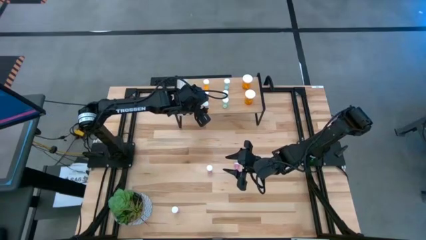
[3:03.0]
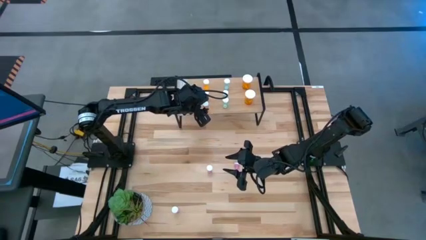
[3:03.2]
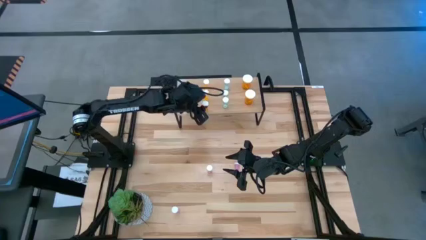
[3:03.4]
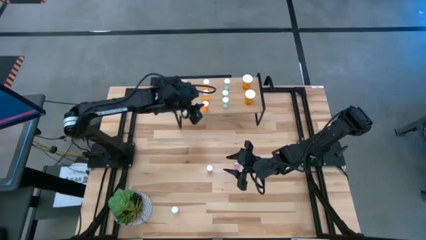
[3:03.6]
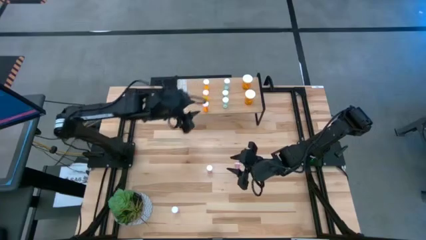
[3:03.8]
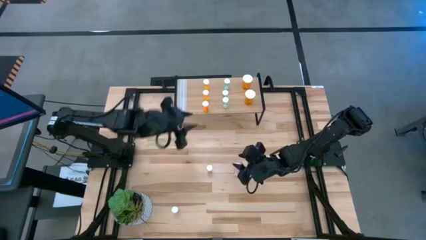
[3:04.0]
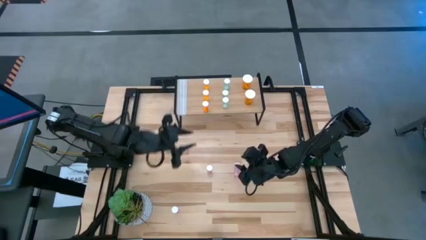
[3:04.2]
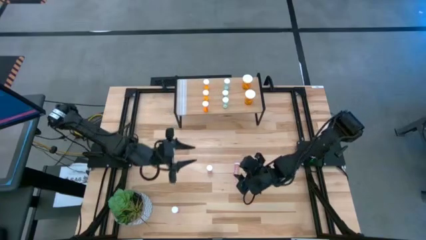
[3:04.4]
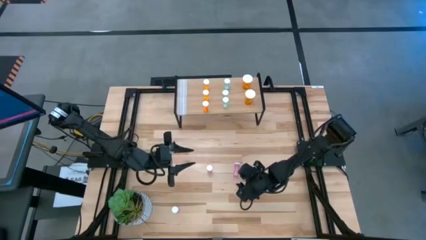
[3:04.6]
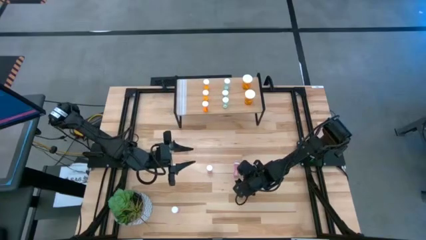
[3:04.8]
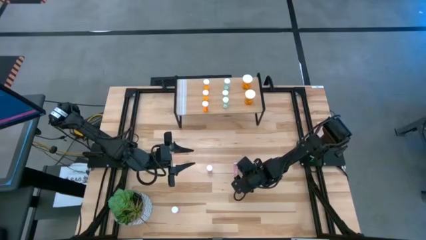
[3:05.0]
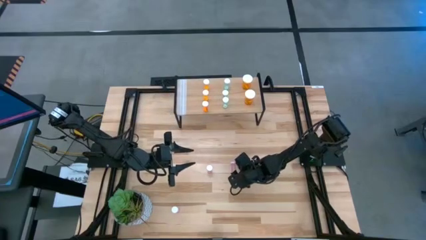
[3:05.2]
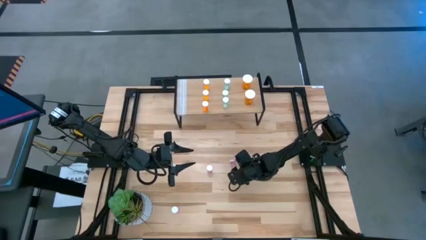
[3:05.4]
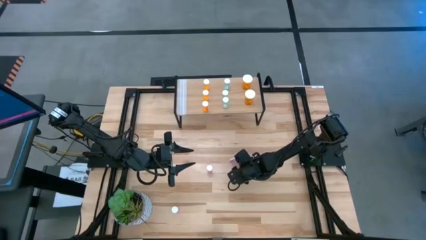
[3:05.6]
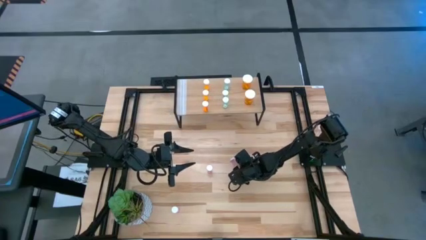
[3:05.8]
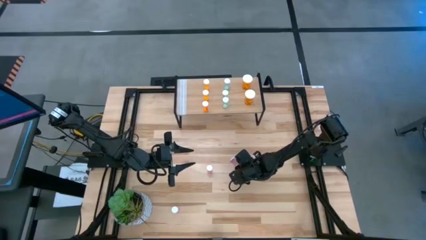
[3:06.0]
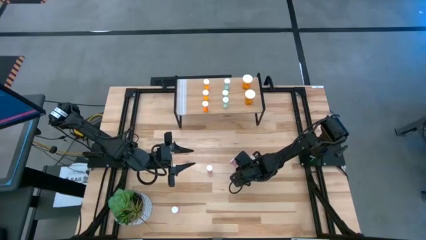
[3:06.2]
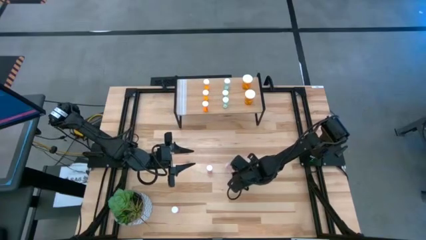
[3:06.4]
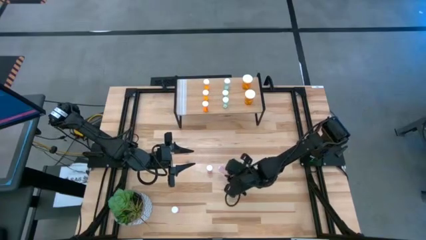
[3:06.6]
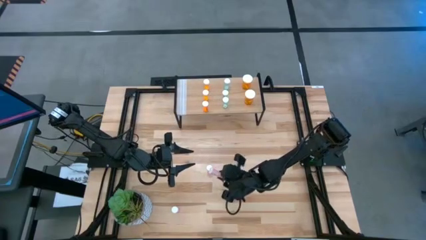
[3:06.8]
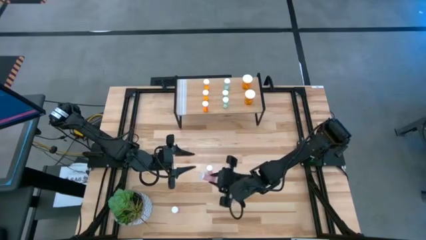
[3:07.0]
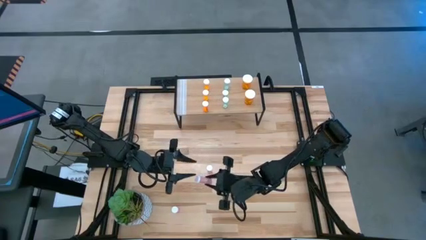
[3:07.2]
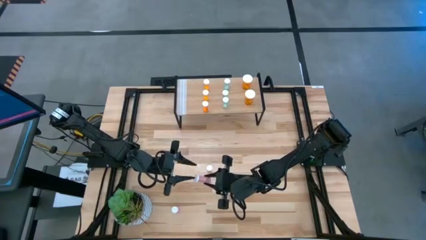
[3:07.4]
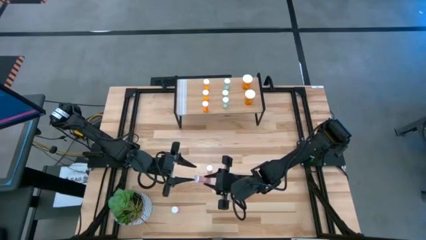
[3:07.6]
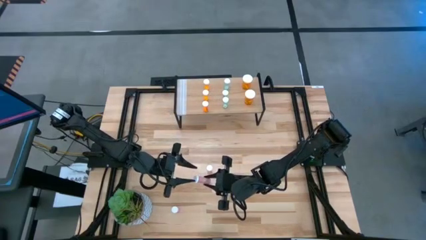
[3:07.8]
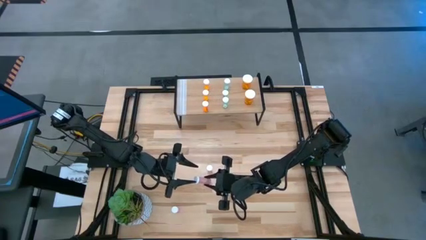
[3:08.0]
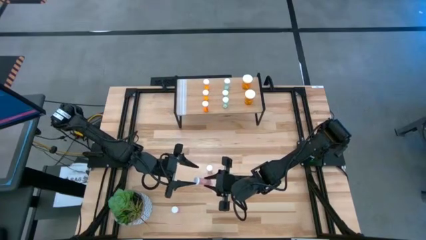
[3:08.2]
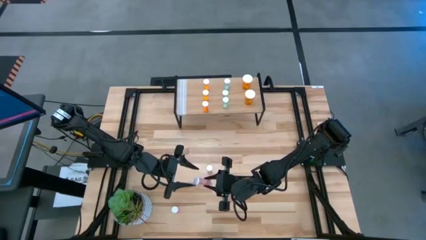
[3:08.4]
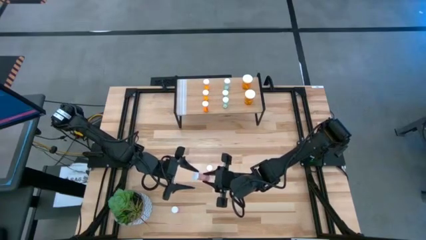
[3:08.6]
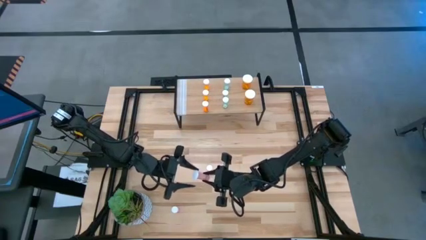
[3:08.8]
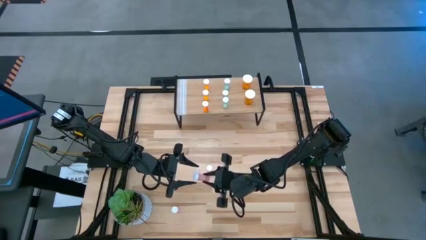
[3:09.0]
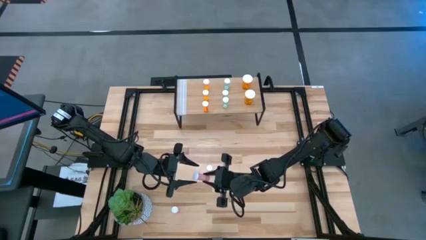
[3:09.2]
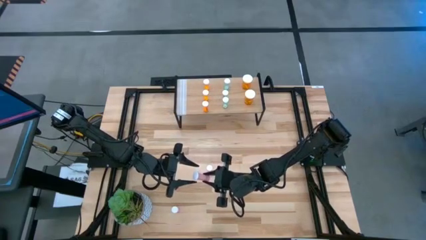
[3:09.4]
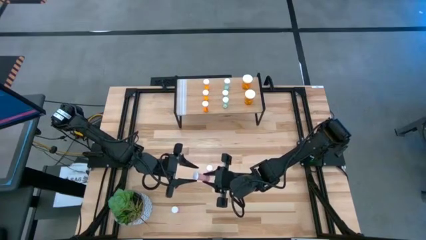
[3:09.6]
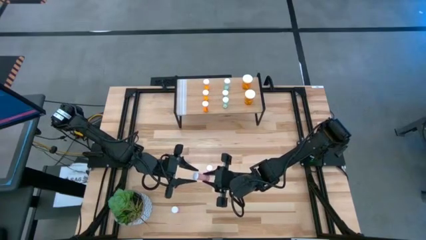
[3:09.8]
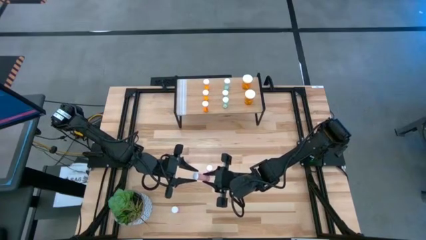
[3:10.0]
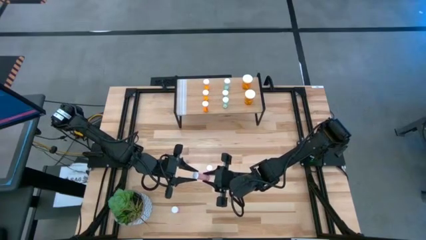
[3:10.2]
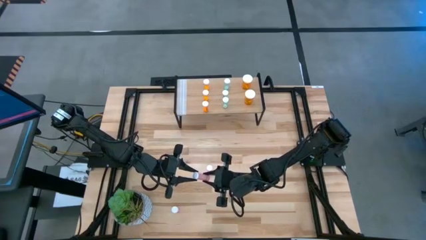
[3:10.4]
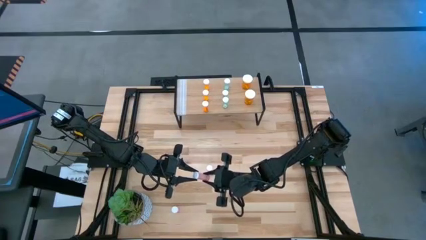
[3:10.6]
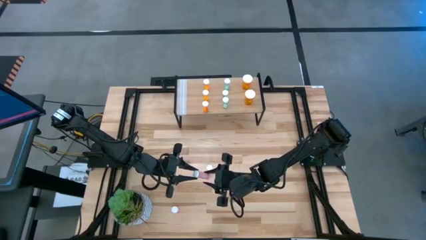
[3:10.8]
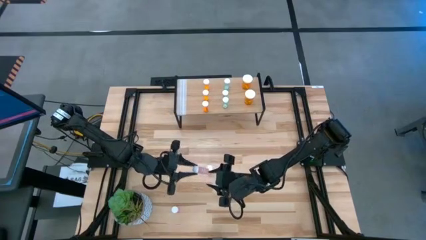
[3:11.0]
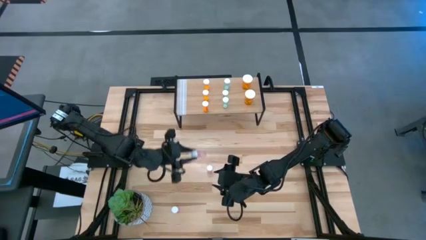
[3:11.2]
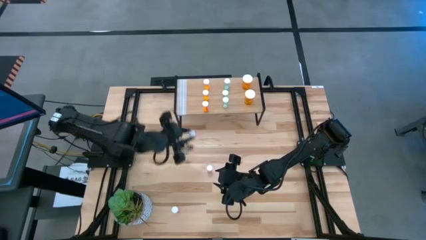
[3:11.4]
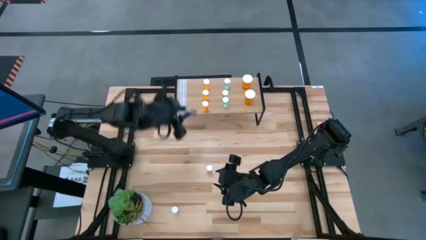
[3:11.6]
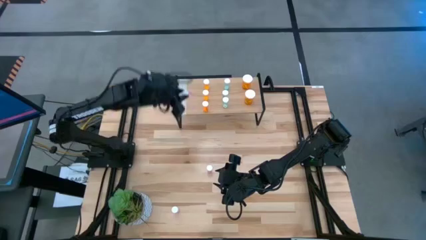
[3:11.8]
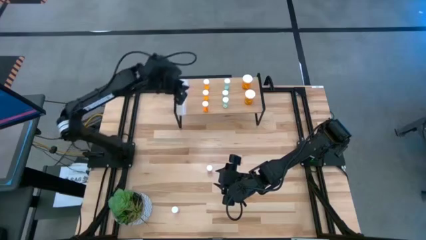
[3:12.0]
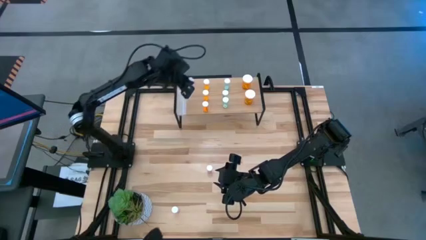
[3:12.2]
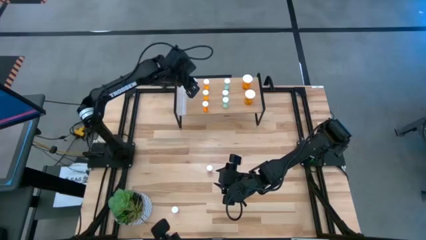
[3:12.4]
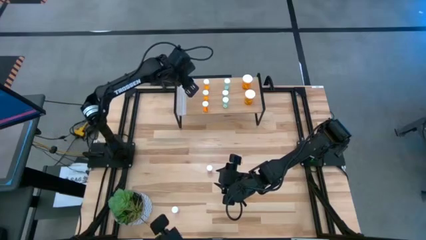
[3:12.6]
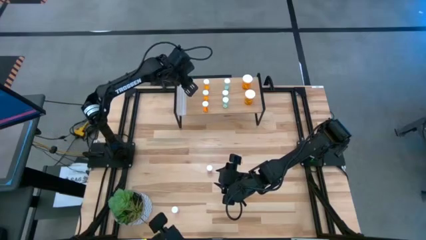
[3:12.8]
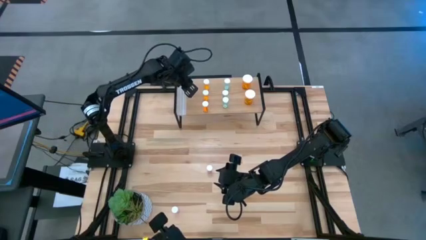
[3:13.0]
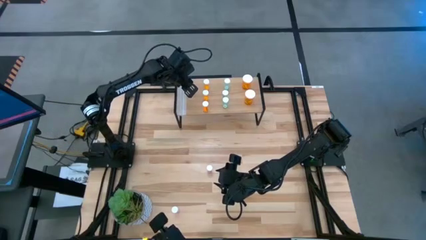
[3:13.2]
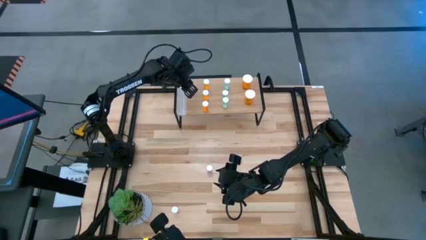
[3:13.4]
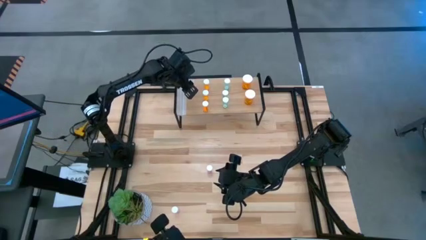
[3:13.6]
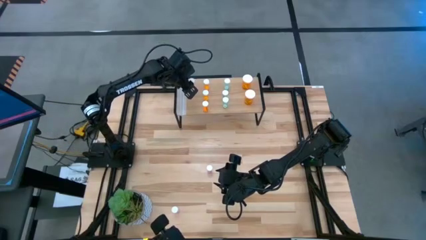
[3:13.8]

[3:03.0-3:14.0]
Task: Pick and place medicine bottles onto shelf by color
Put the top right small pink pill bottle on the shelf

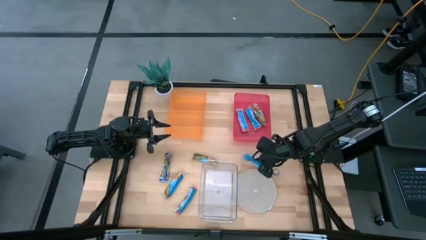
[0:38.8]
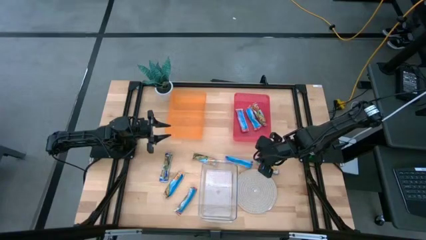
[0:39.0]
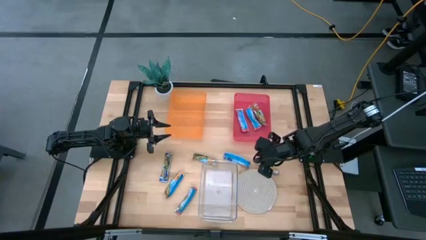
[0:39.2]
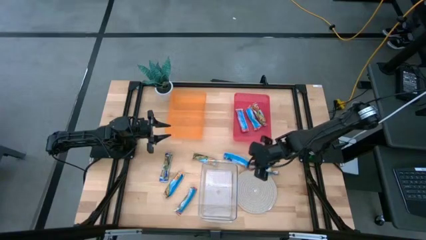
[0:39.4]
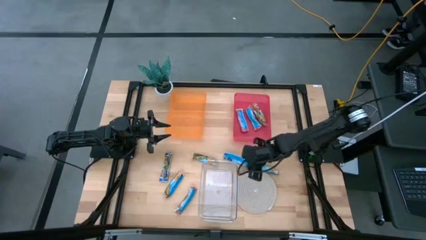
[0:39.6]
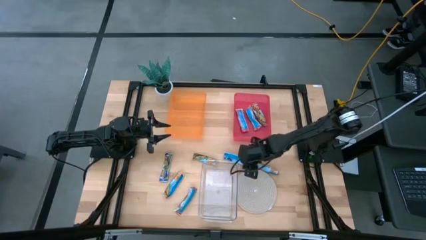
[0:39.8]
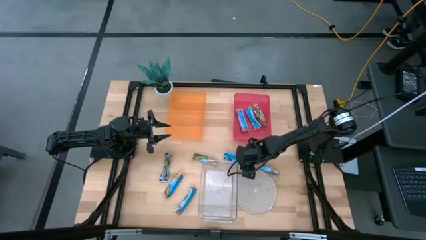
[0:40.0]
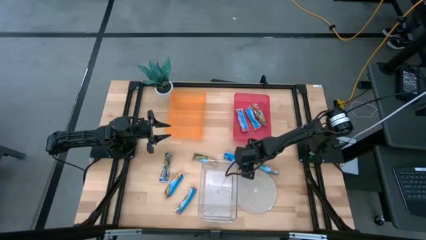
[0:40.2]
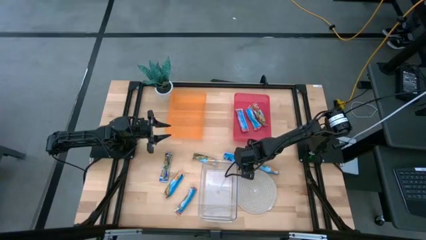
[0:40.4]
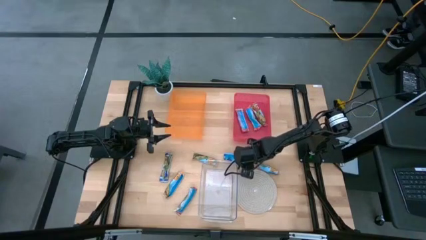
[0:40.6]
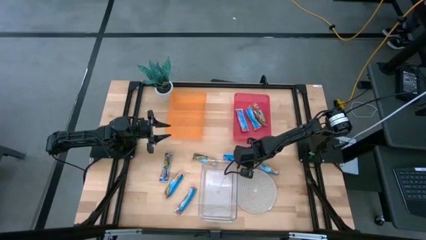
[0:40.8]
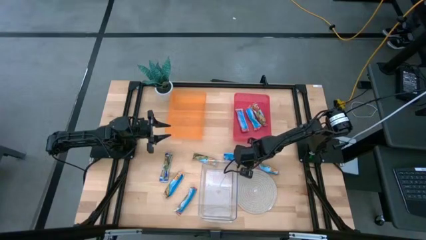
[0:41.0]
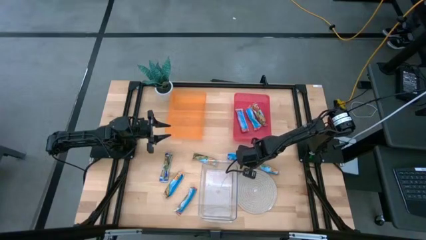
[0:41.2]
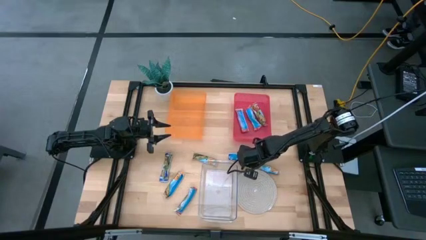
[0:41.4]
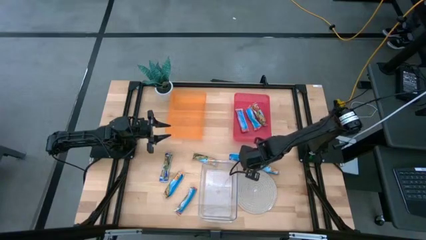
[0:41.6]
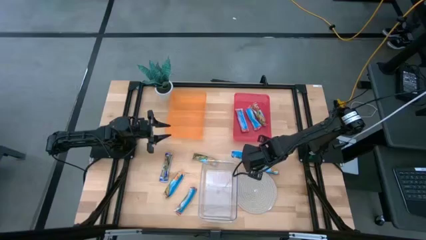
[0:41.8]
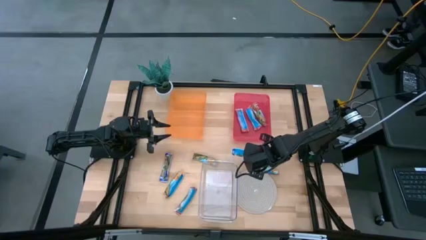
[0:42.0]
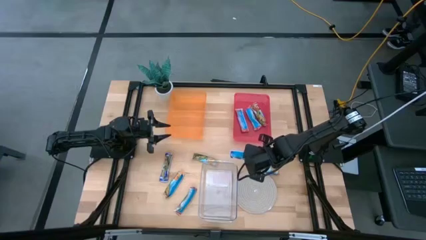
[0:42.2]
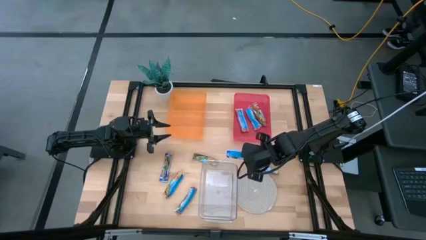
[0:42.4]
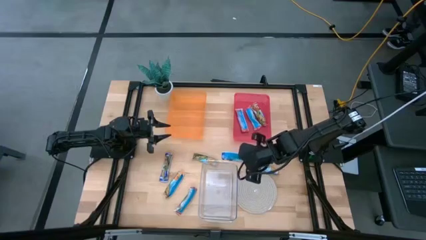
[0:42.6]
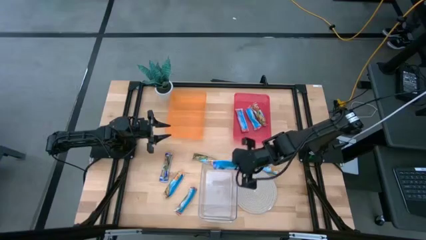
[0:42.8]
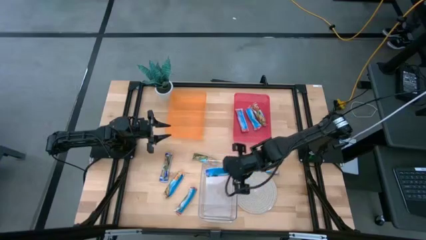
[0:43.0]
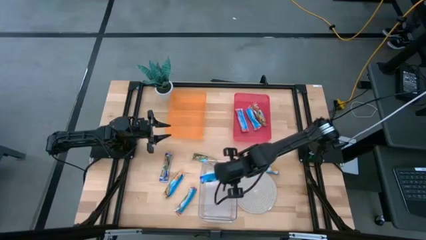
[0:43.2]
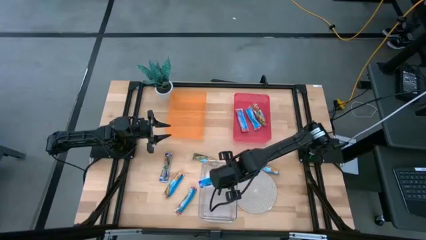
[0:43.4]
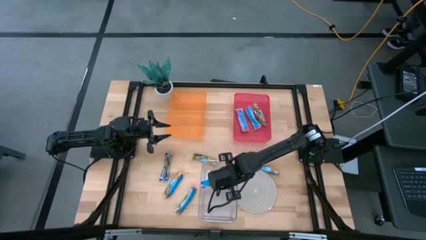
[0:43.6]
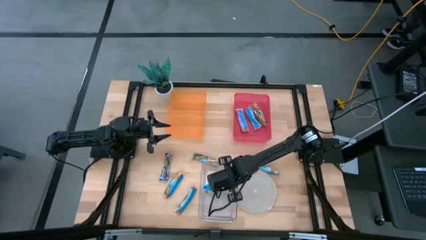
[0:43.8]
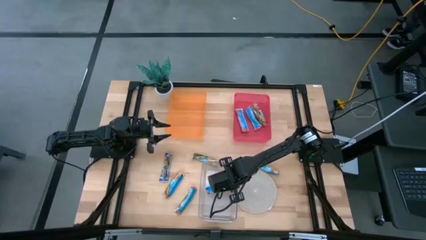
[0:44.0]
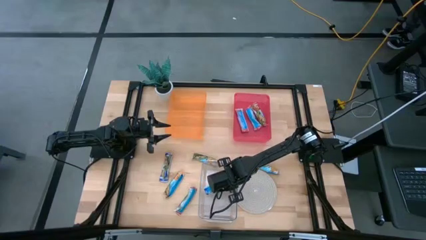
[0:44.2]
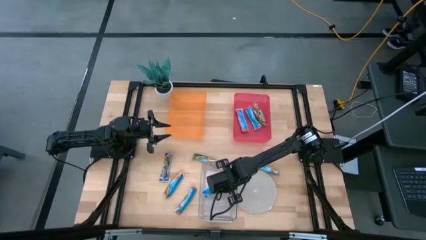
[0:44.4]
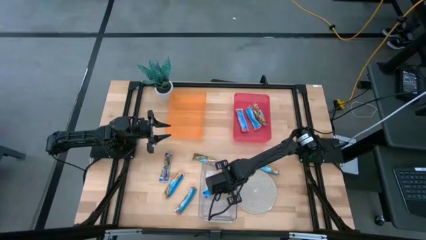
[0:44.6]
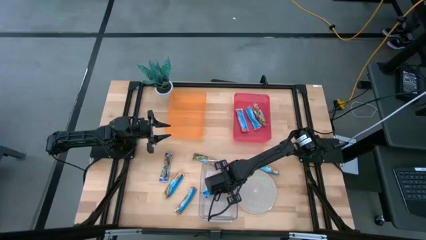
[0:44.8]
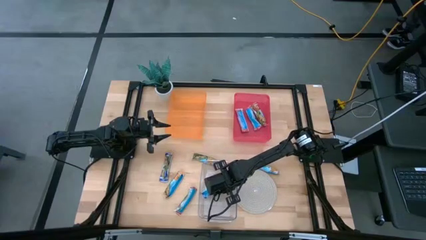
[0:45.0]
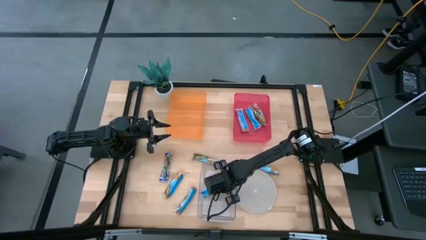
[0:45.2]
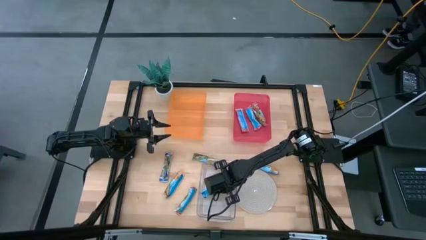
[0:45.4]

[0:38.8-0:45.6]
Task: Pick and place Granola Bars by type
Put the blue granola bar into the transparent bin
